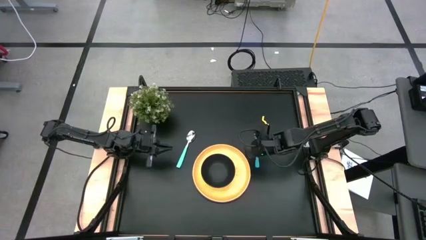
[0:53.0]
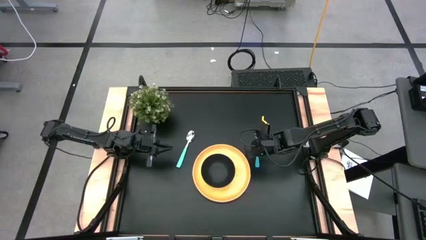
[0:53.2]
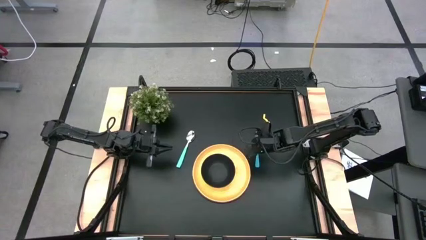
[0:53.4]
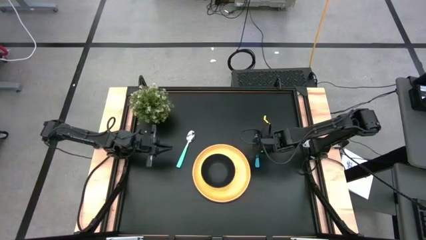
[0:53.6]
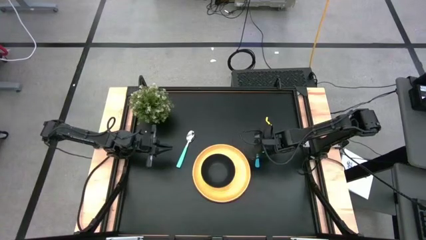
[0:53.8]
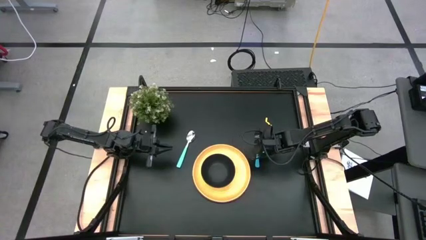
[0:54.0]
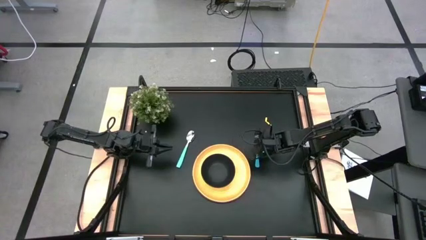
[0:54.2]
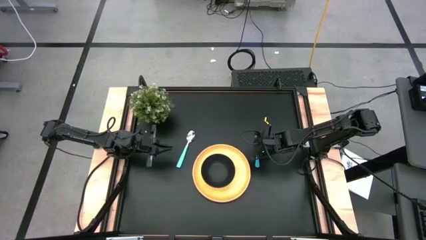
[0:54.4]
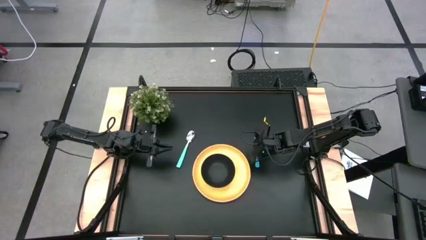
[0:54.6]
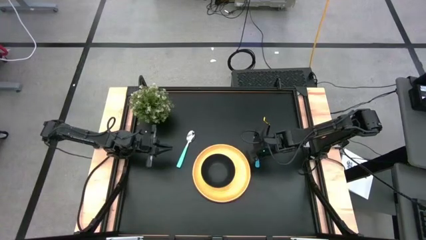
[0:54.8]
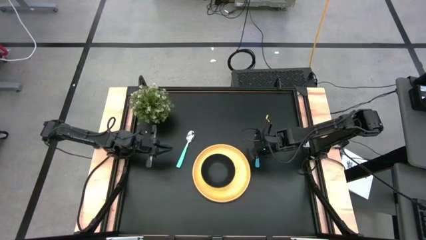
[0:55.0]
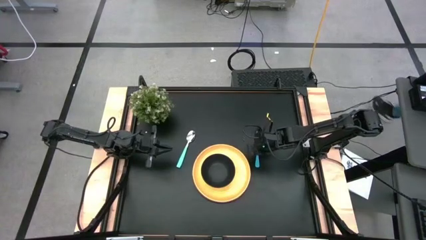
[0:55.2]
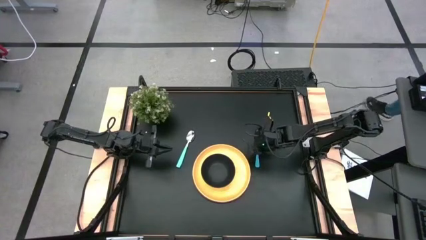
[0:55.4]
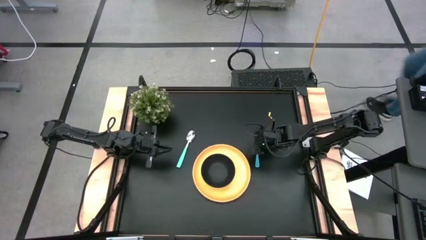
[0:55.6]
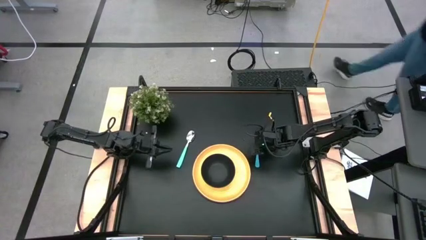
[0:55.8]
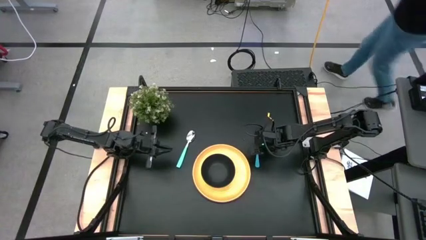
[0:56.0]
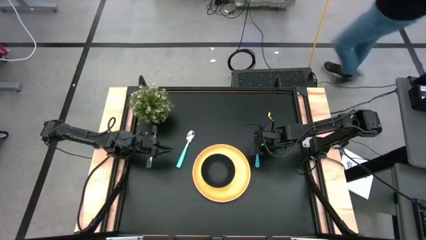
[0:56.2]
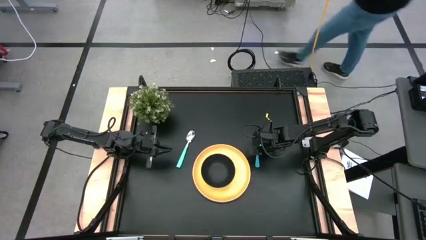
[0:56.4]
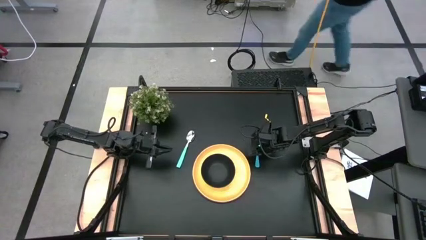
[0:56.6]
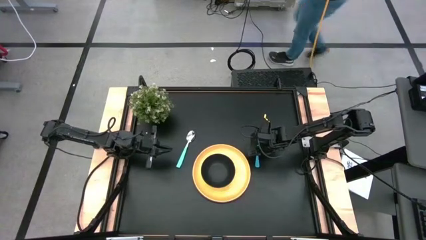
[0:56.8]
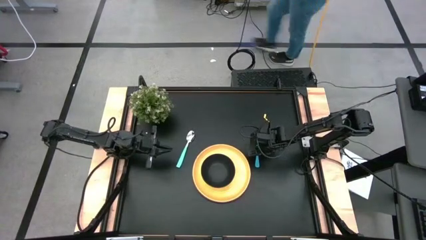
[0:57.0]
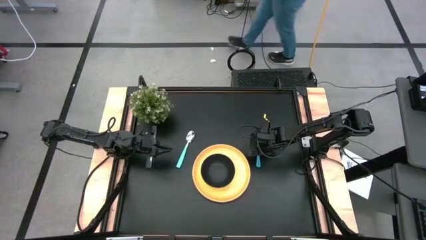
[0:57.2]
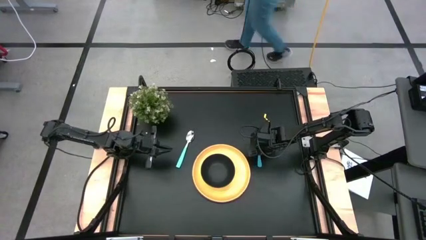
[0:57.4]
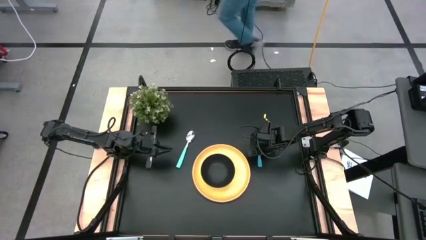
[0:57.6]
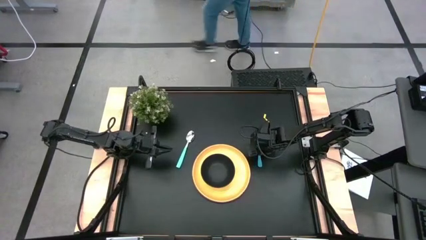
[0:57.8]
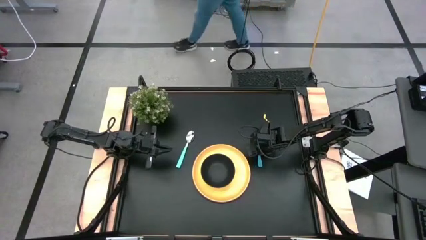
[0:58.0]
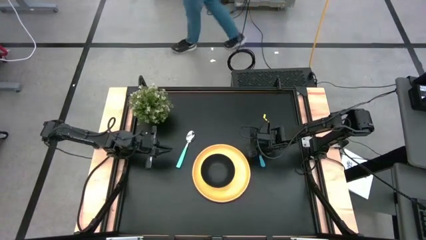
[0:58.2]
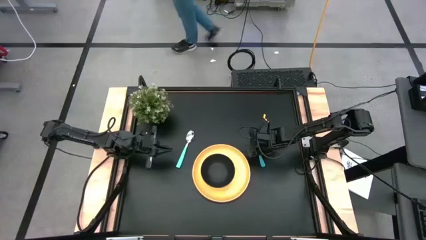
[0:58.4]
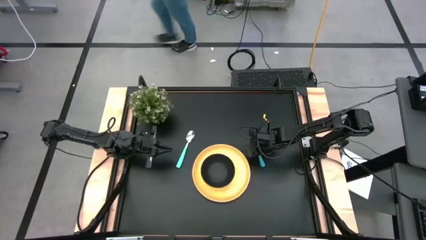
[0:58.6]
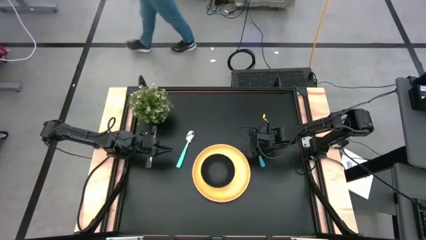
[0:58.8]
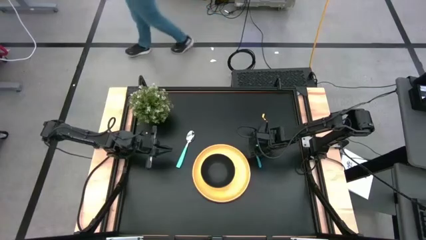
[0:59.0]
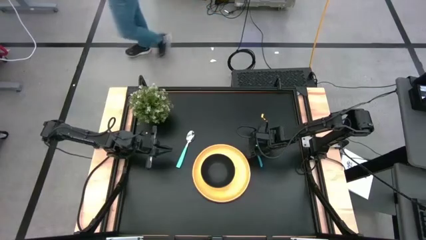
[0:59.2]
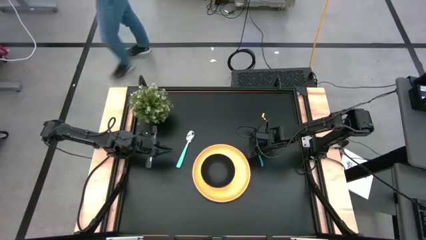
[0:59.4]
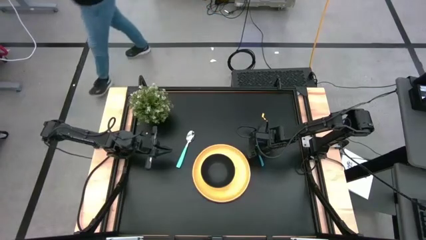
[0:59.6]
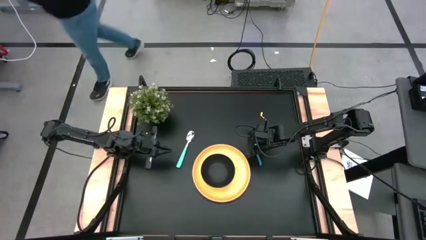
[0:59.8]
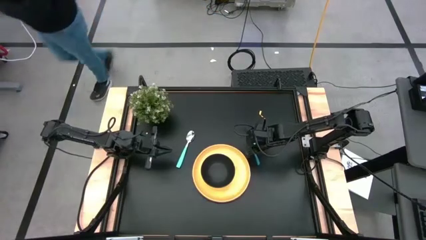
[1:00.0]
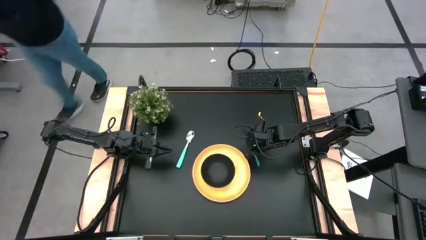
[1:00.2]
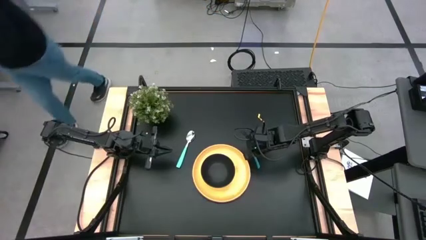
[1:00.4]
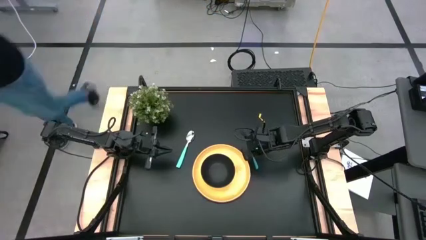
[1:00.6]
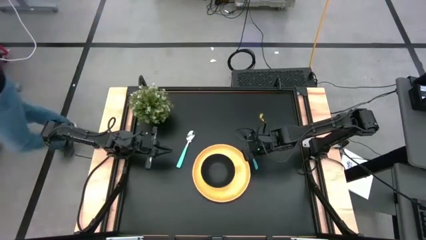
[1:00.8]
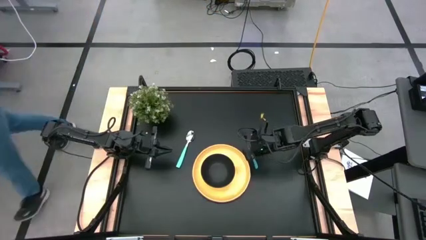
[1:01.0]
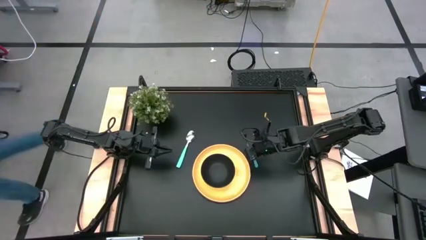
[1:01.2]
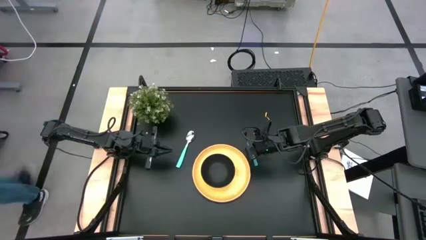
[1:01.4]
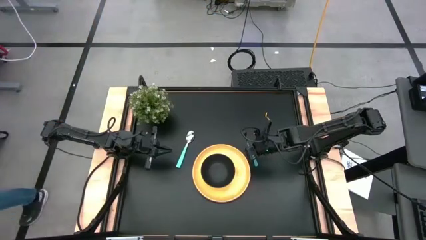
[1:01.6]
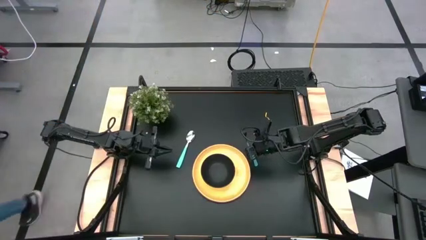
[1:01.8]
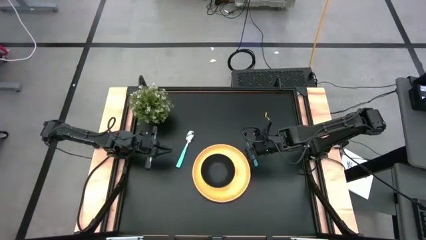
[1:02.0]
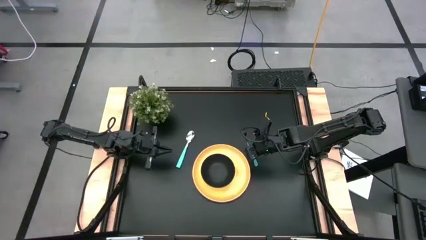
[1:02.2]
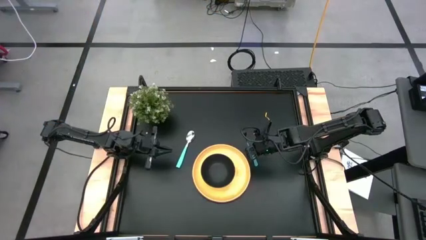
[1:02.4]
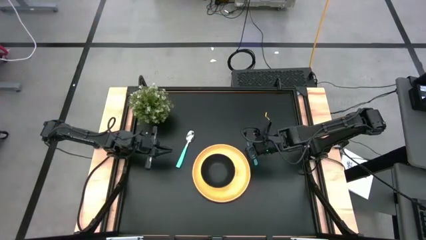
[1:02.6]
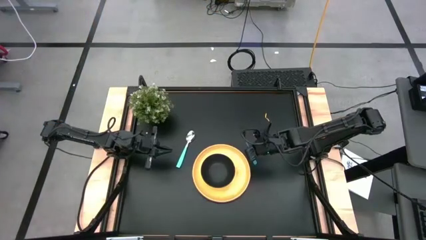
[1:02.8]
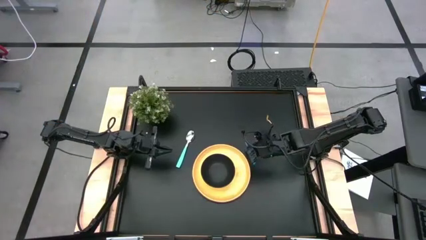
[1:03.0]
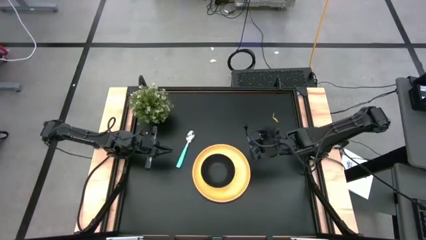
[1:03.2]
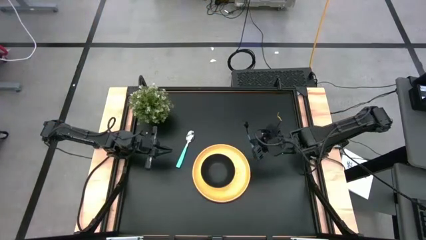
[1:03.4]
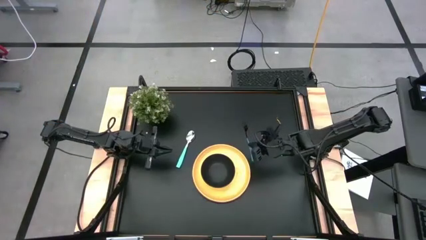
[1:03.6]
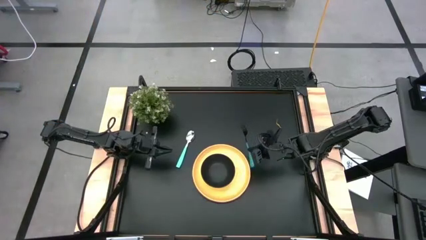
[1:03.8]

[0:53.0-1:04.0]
Task: Set table place
Put the blue fork on the yellow plate to the right of the black bowl
